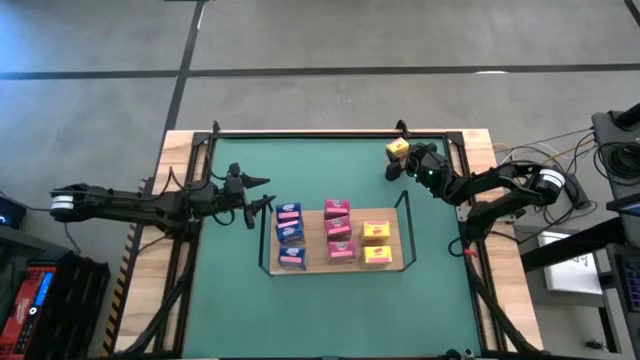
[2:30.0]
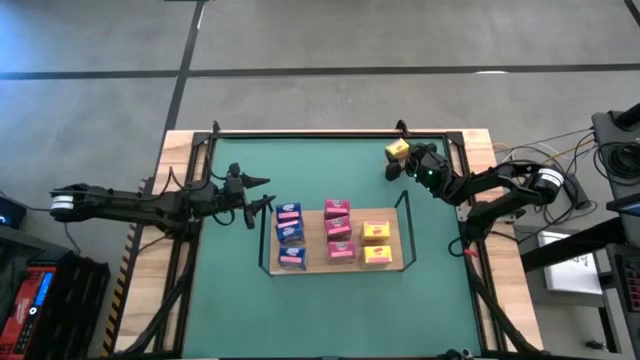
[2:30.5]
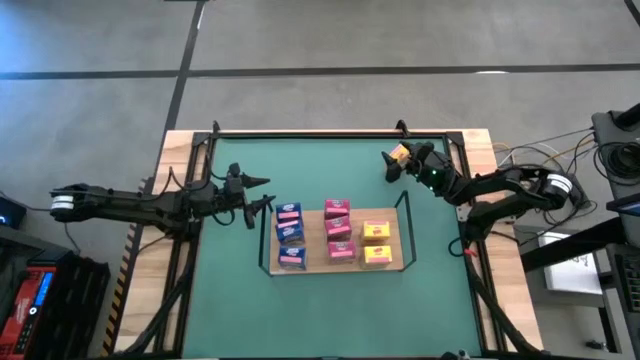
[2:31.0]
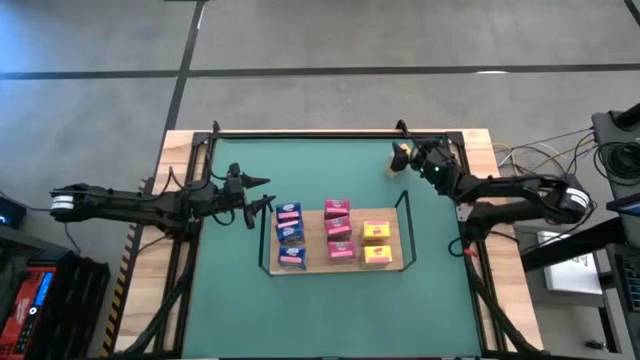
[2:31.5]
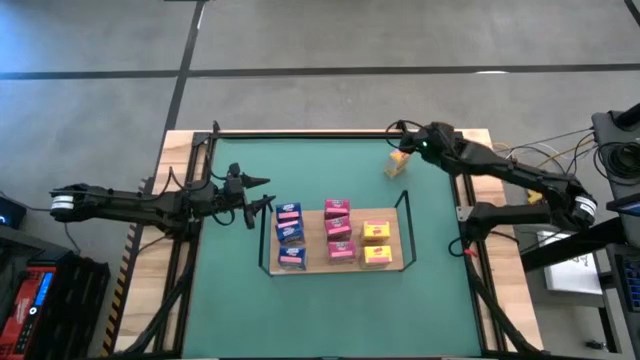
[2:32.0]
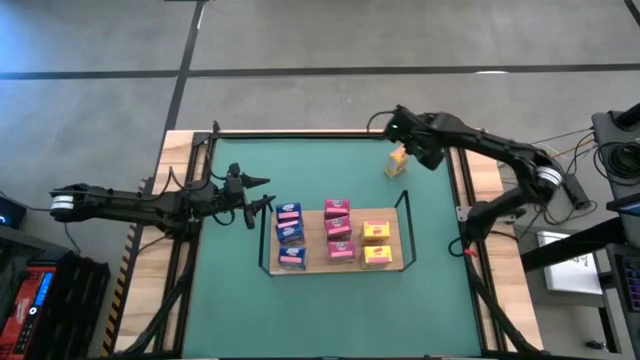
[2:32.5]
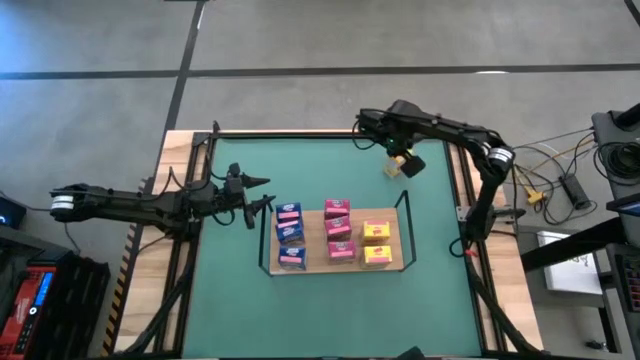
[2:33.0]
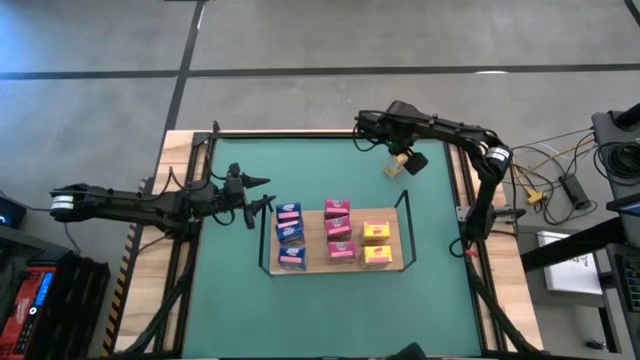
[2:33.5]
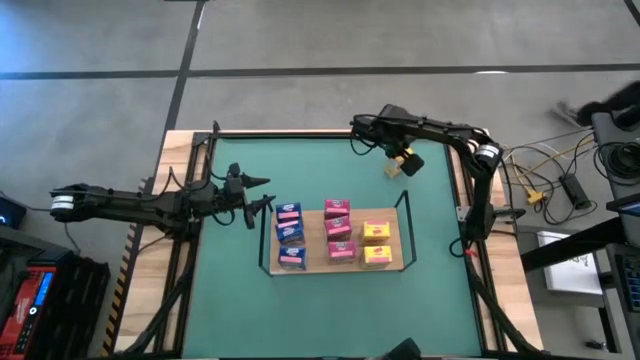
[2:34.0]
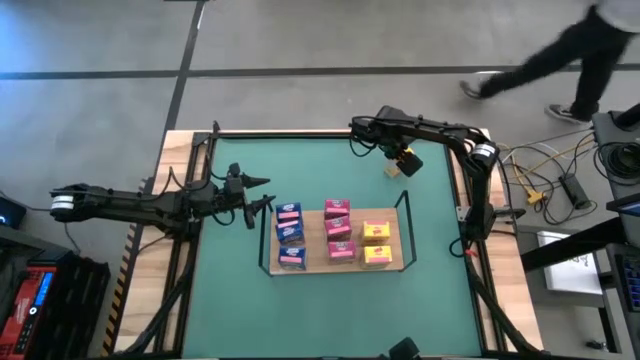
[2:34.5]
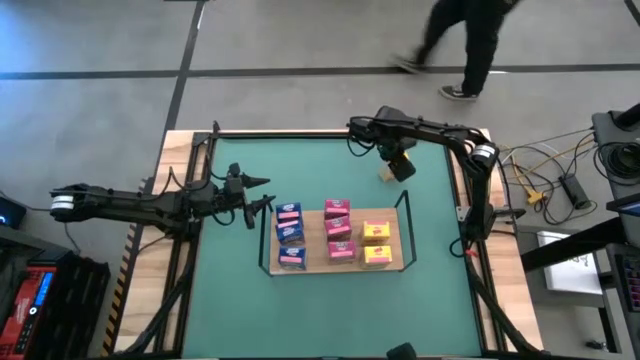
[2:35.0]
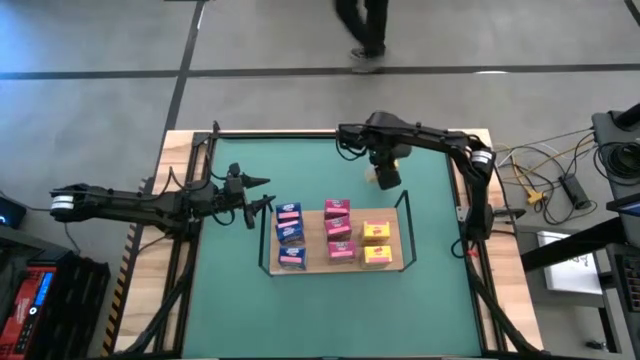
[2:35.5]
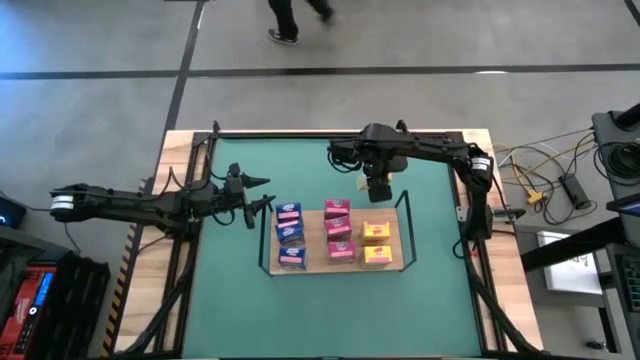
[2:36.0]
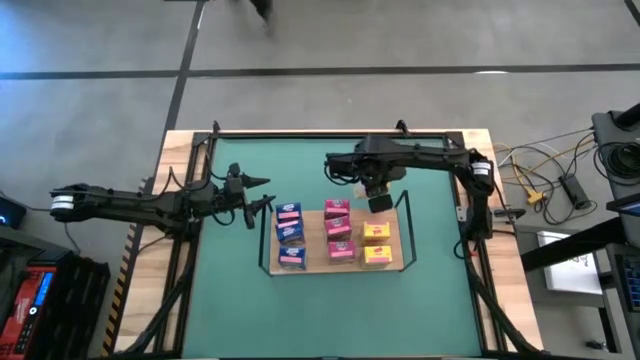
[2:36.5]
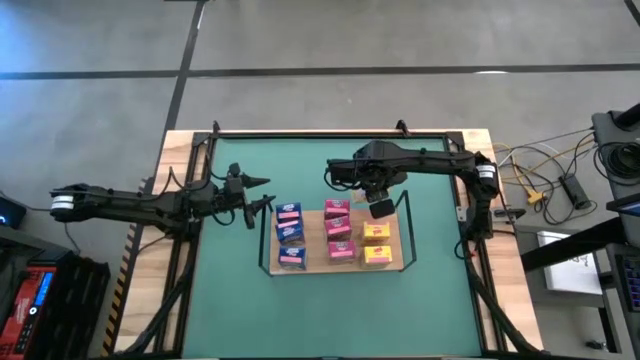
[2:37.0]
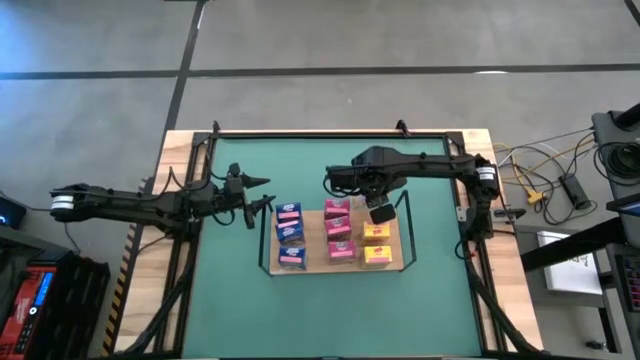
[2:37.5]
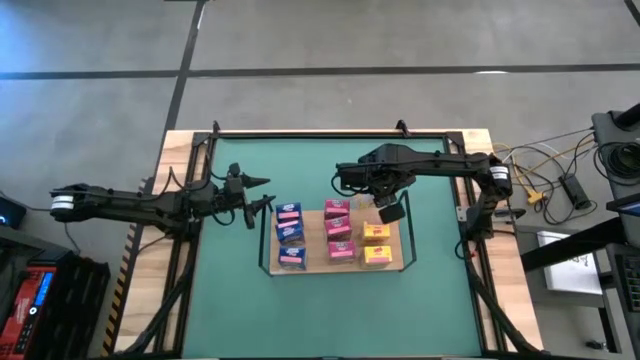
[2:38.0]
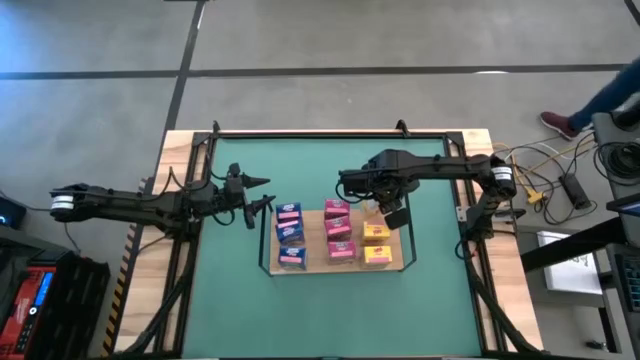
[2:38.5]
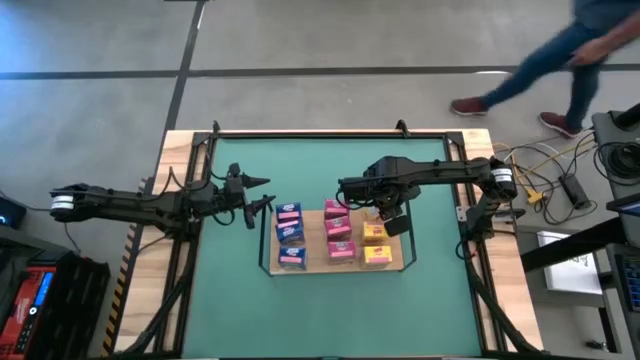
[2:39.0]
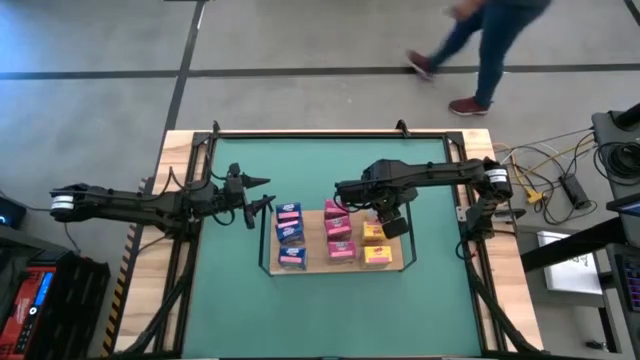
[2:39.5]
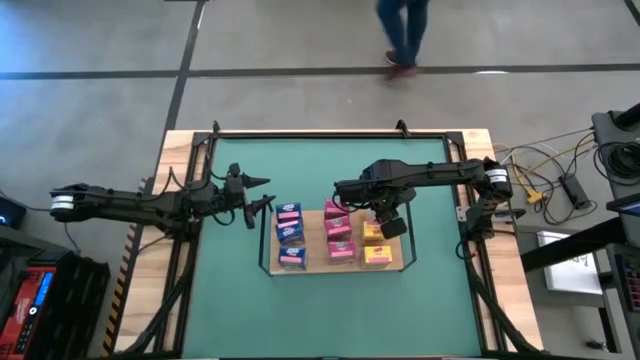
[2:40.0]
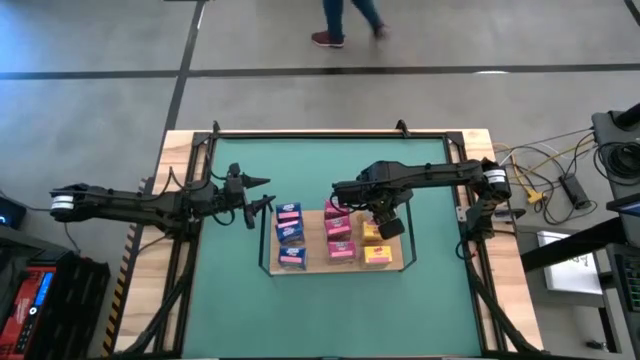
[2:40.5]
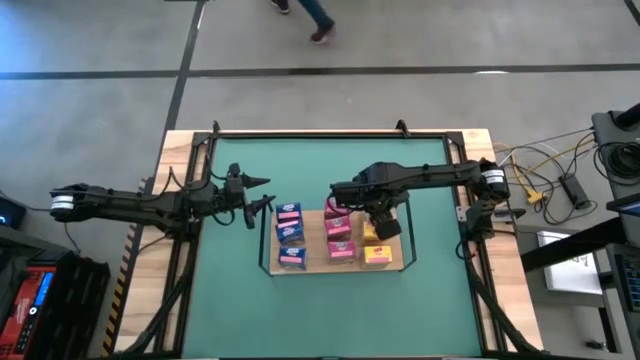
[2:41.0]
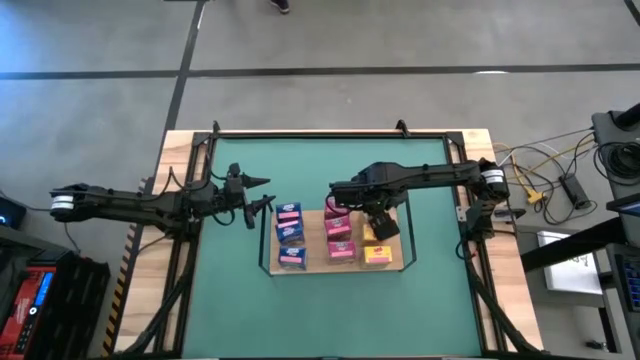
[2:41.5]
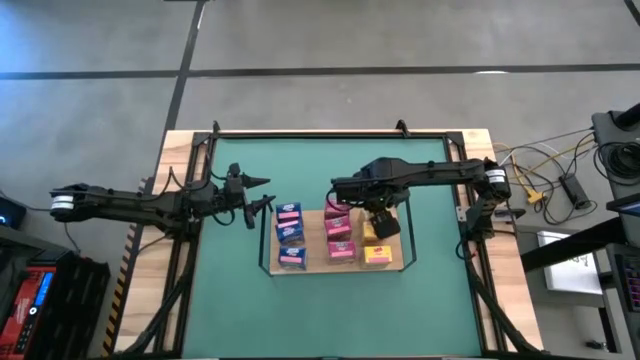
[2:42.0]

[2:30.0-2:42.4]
Task: Stack cereal on shelf
Put the yellow cereal box on the shelf aligned with the other yellow cereal box

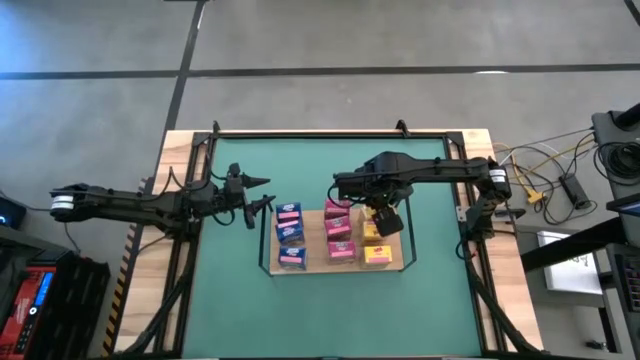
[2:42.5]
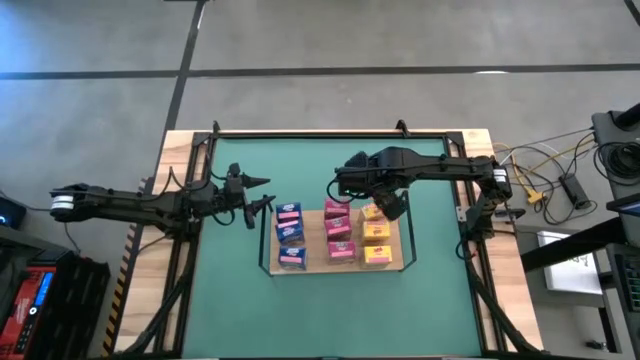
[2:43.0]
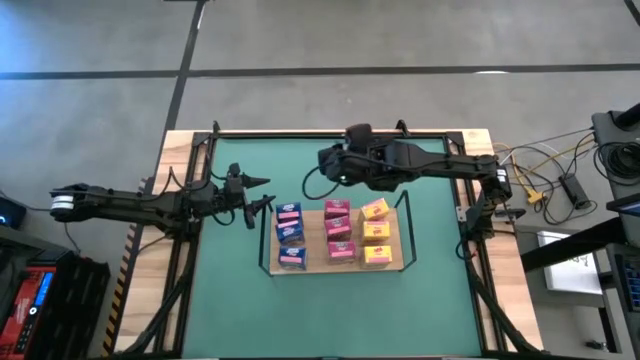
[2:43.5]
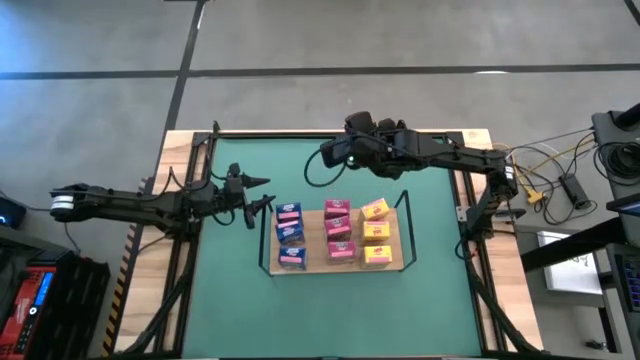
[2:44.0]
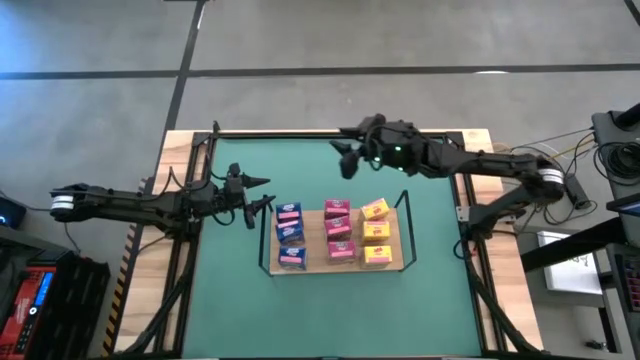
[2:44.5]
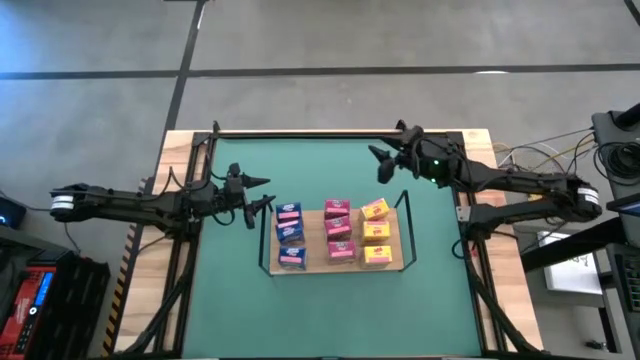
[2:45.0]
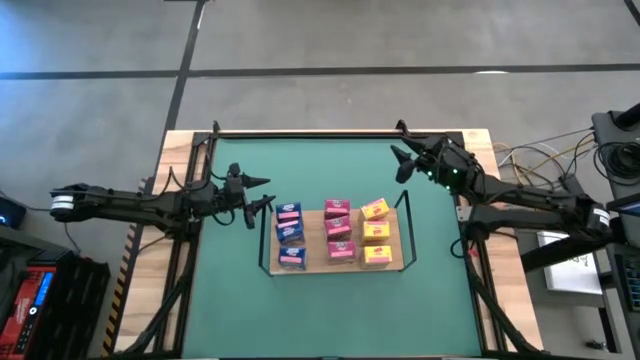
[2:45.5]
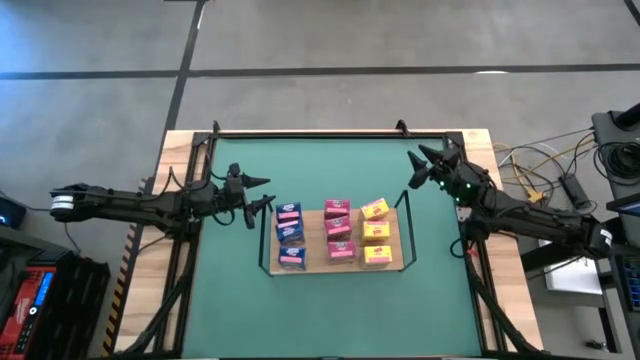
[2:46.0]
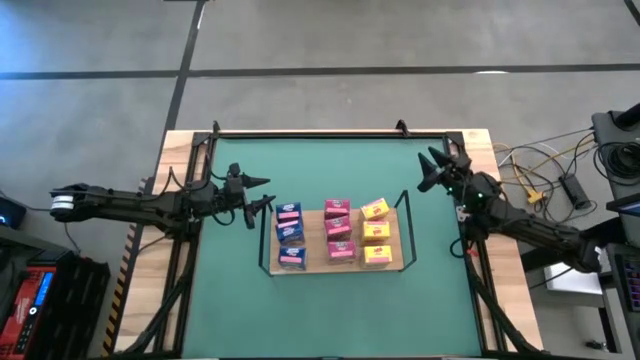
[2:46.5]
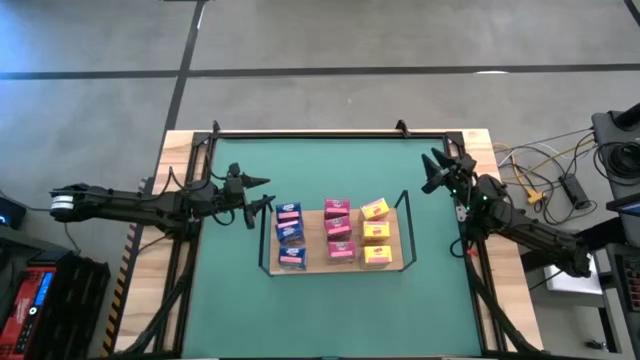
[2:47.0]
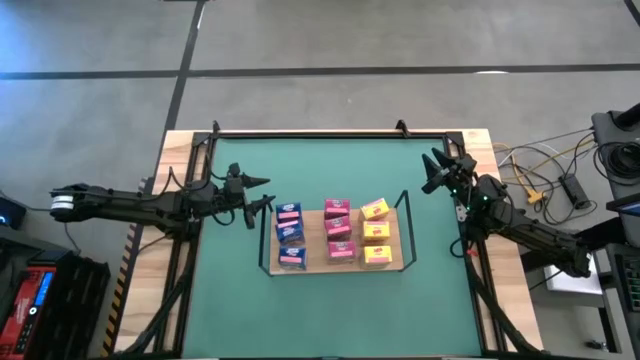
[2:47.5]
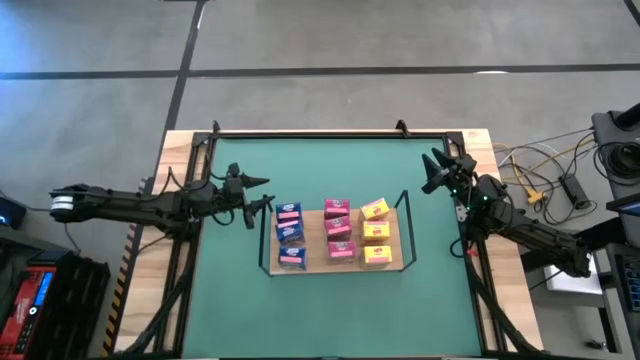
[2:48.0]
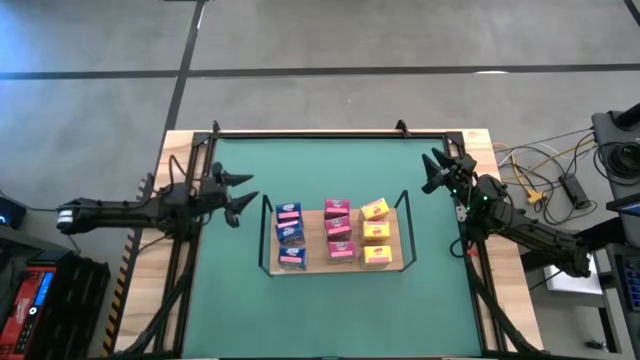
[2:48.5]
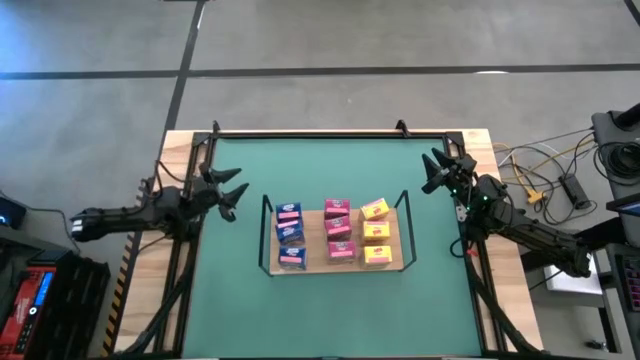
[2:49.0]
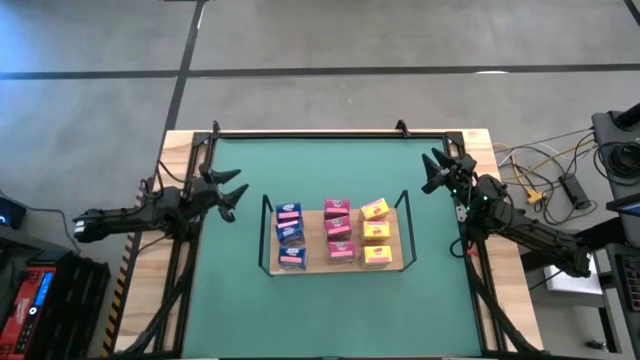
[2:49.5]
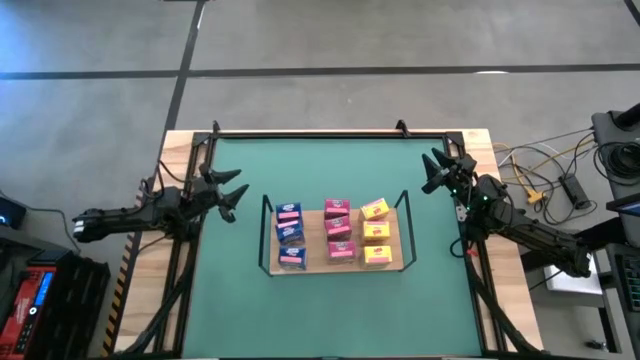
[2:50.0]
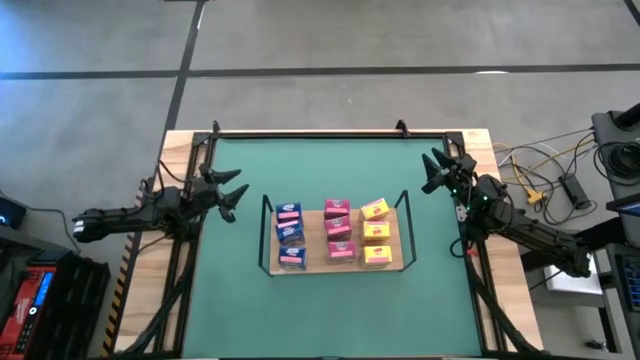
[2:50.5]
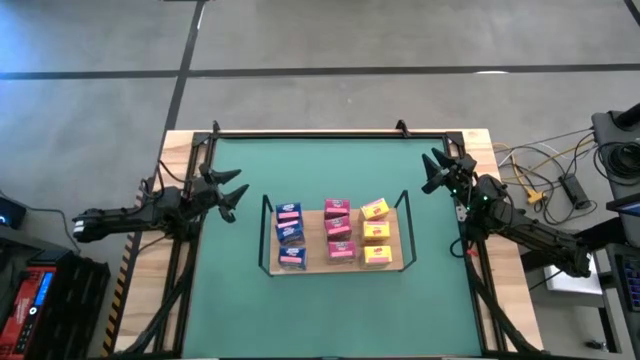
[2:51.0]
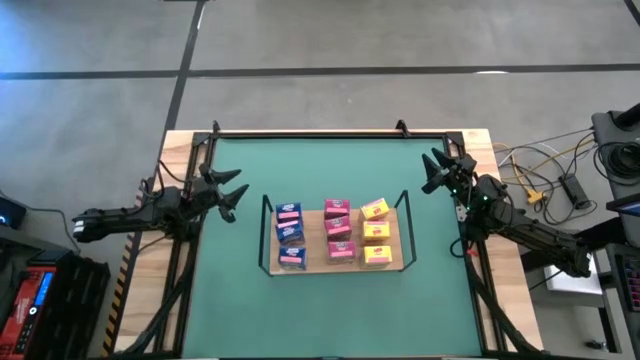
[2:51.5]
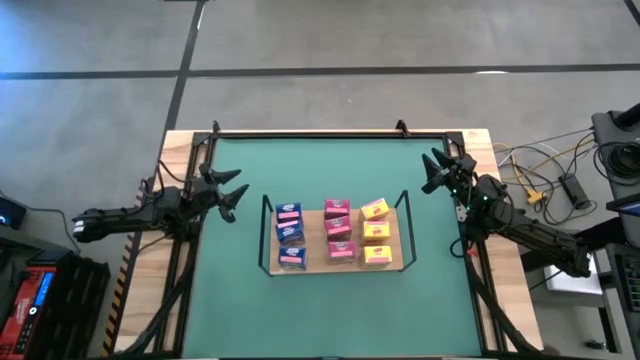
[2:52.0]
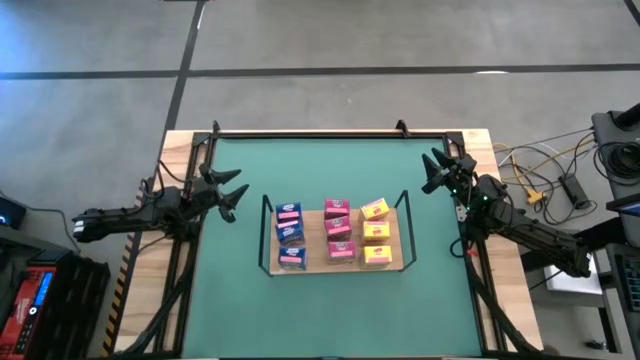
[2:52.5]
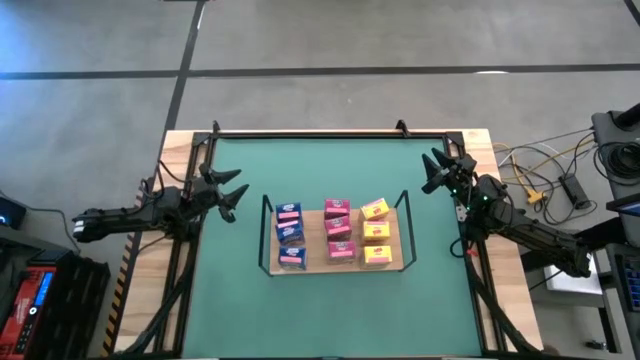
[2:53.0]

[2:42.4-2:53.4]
Return to Home Position
